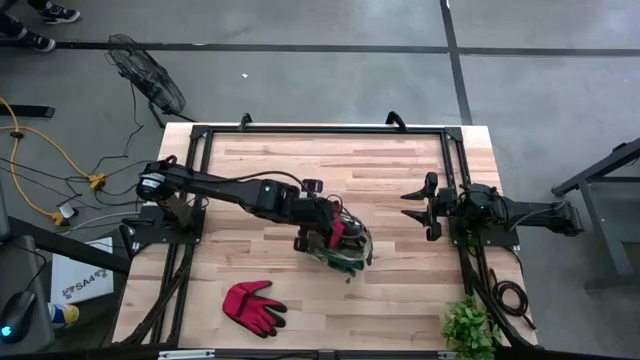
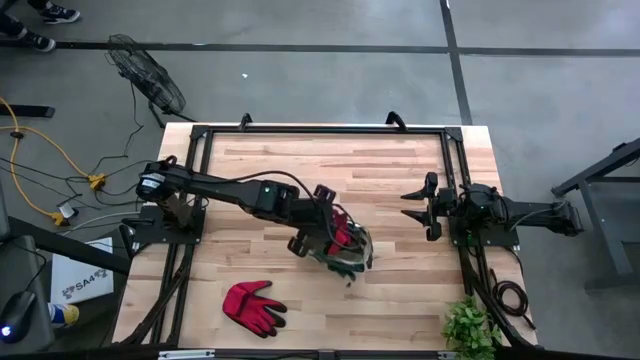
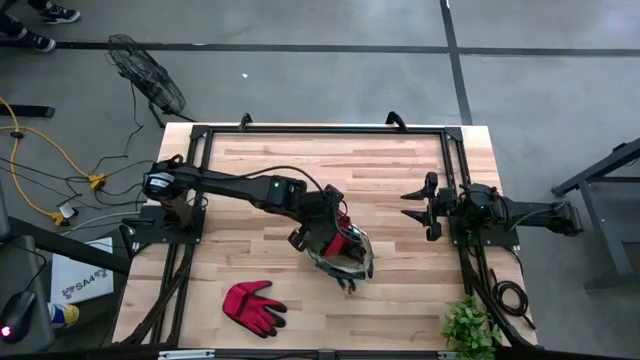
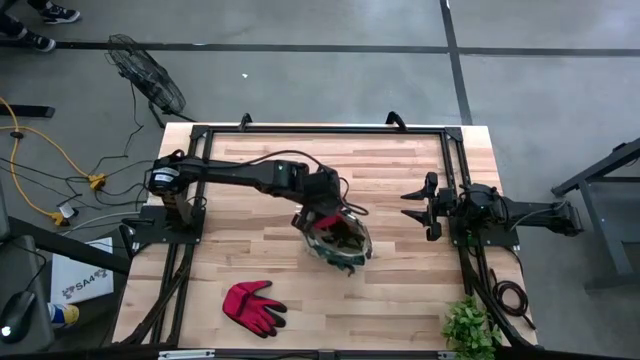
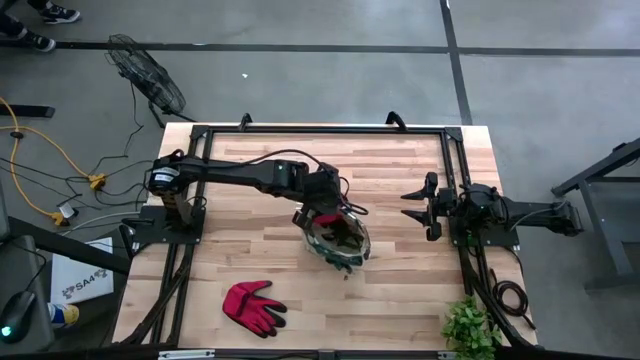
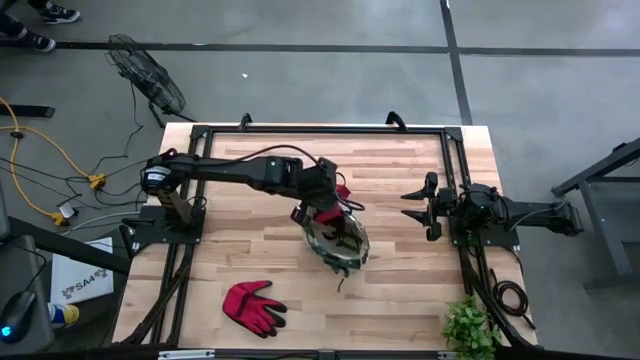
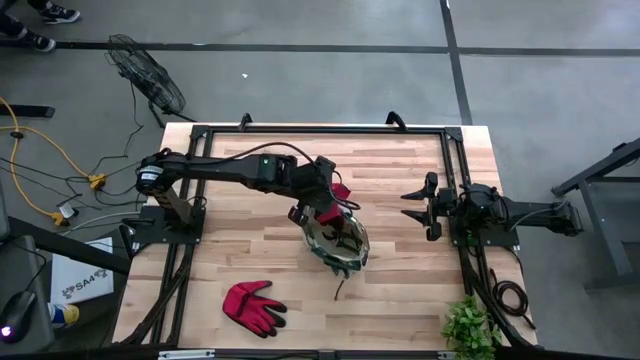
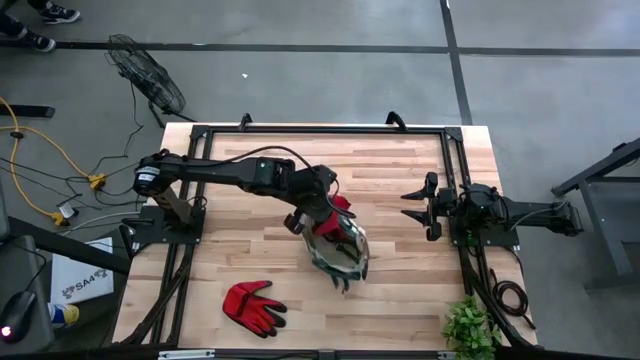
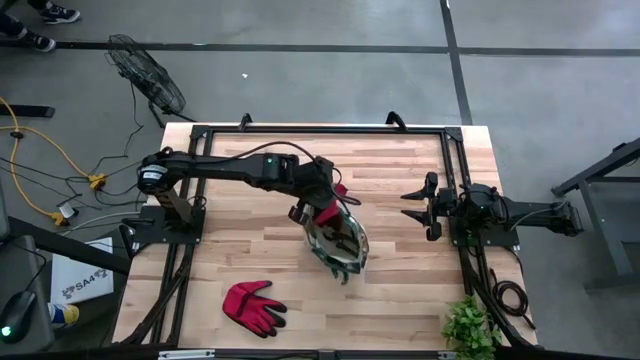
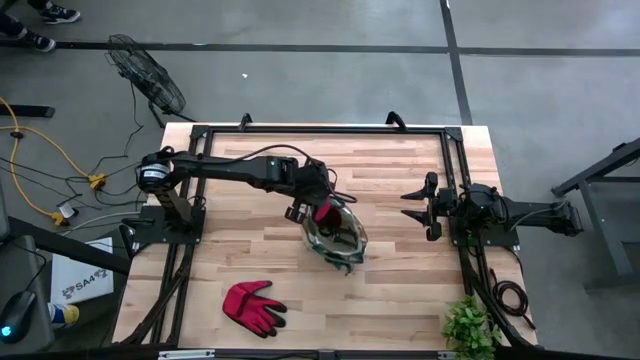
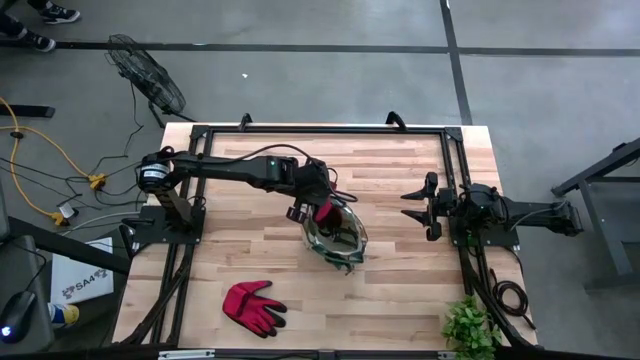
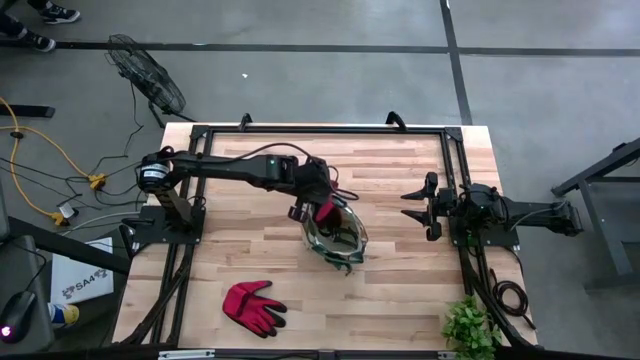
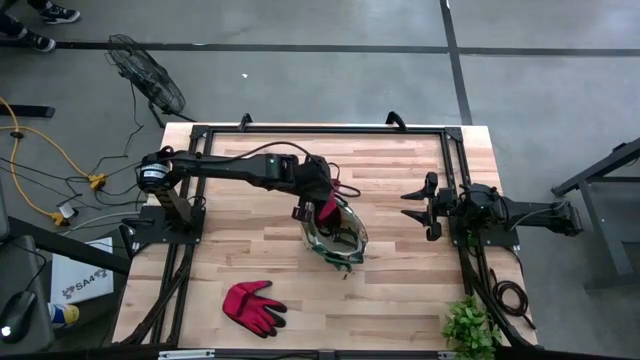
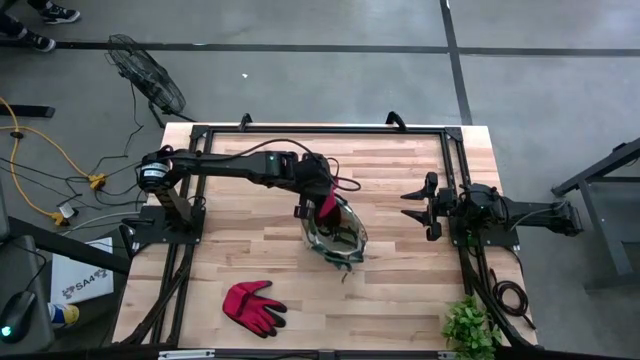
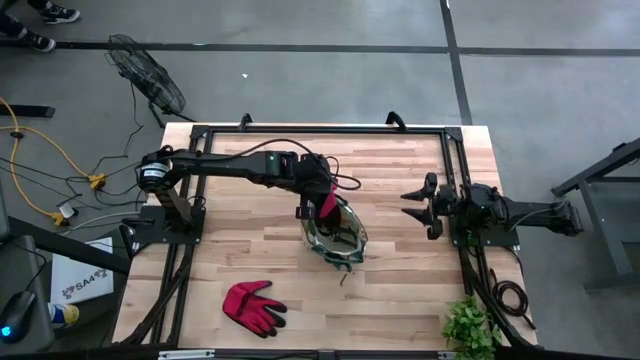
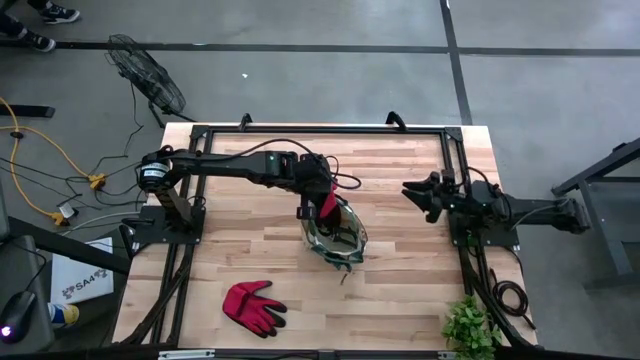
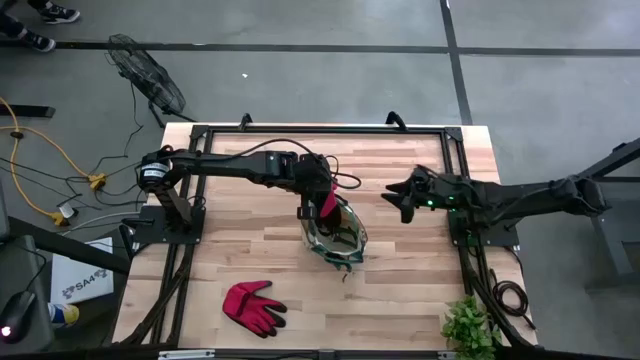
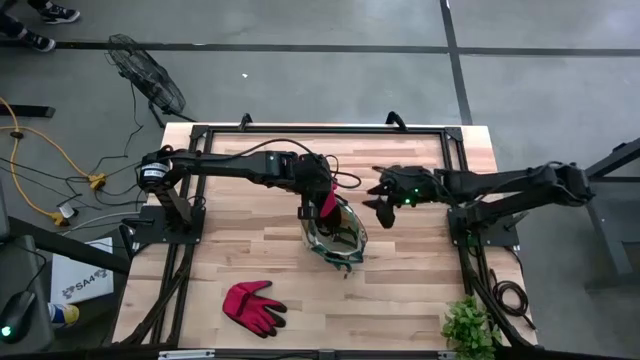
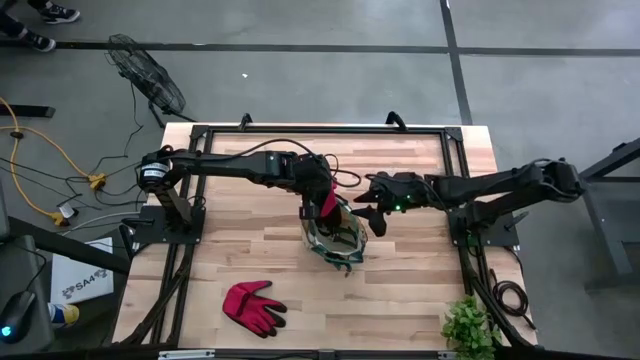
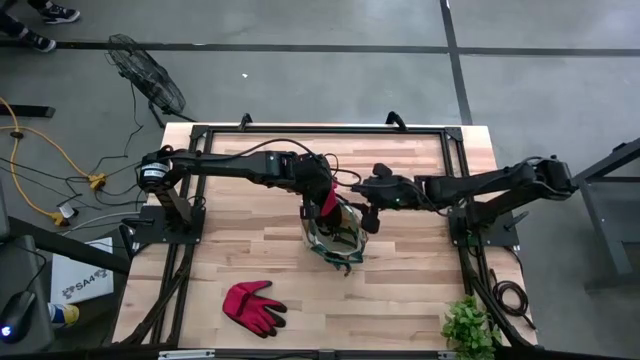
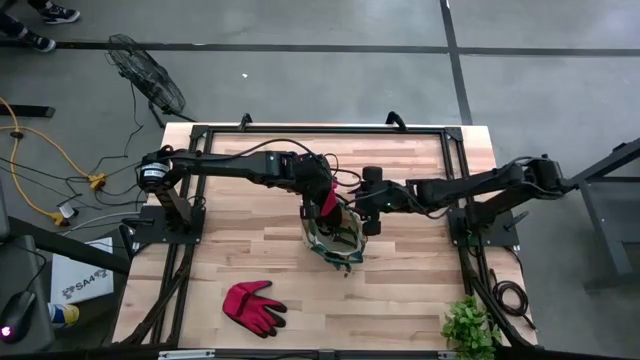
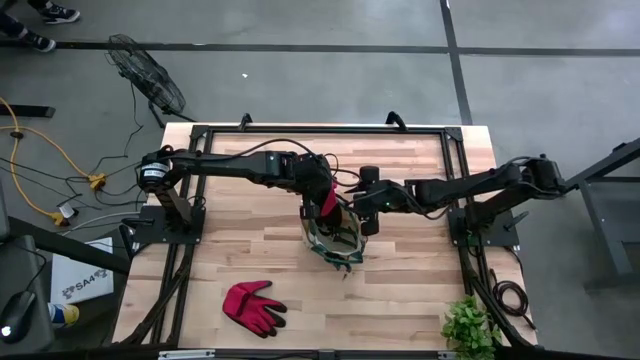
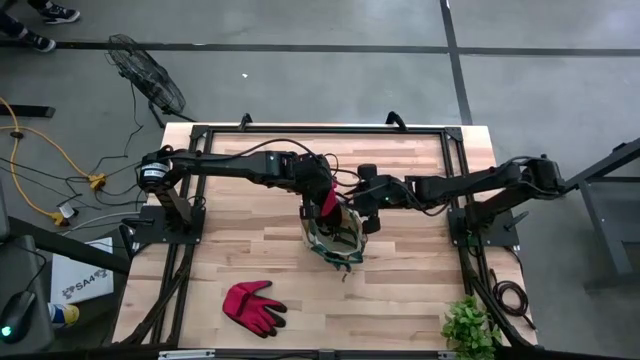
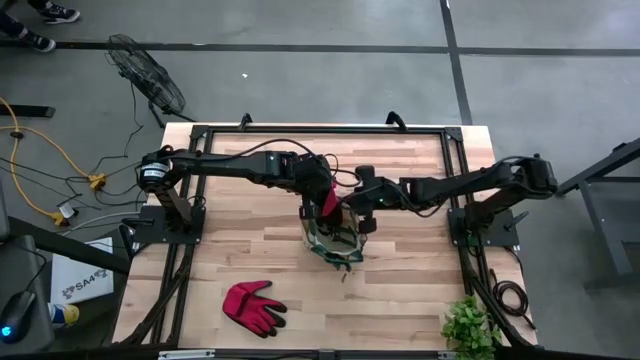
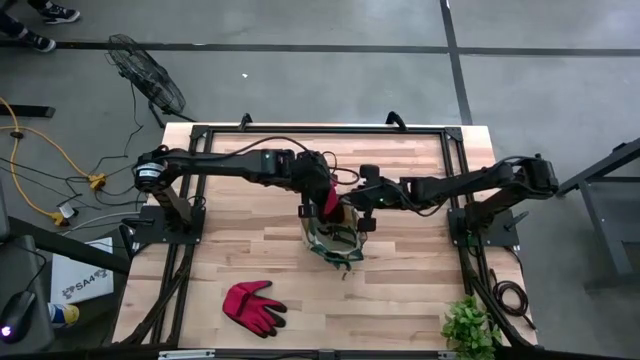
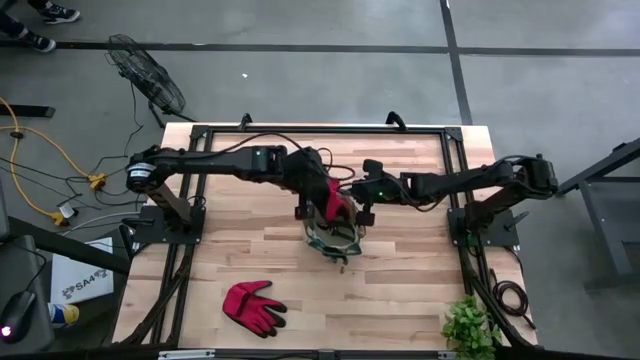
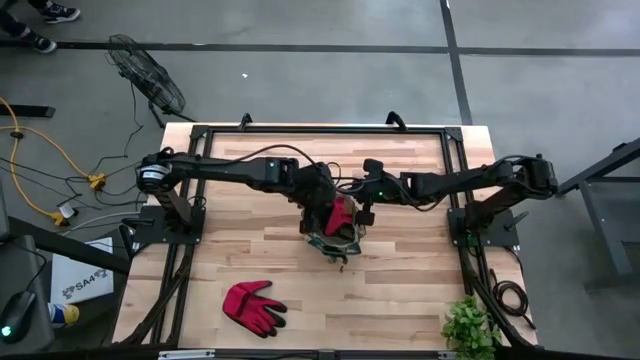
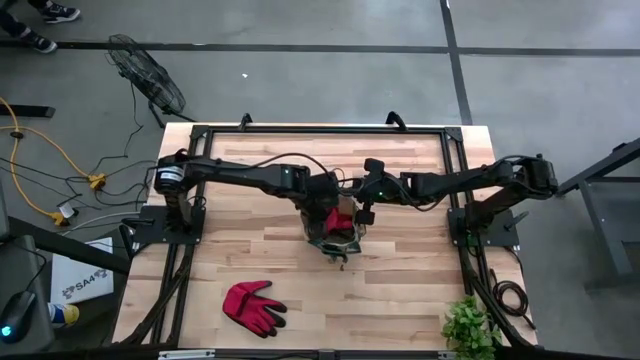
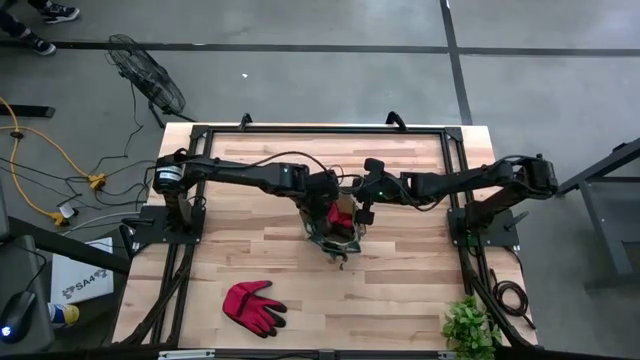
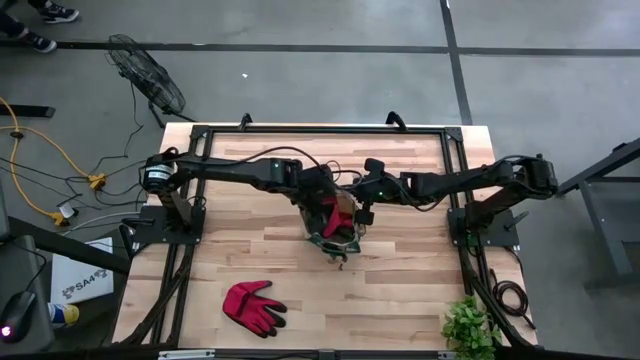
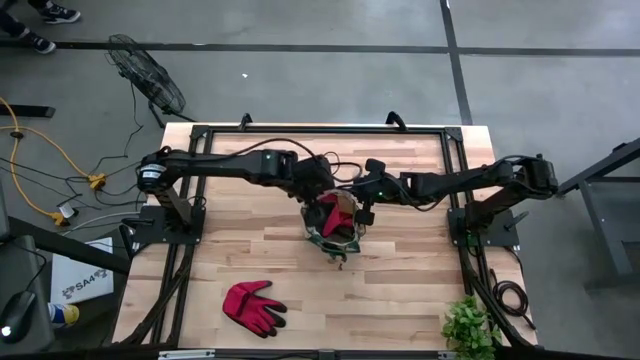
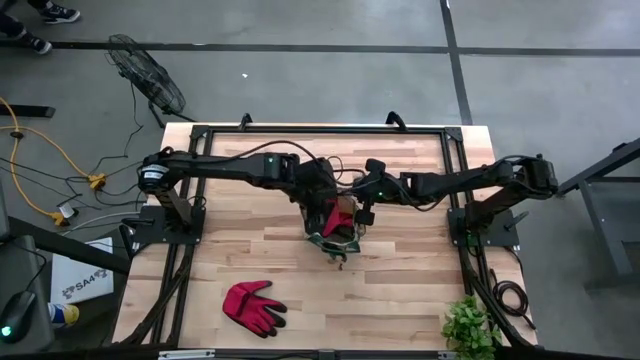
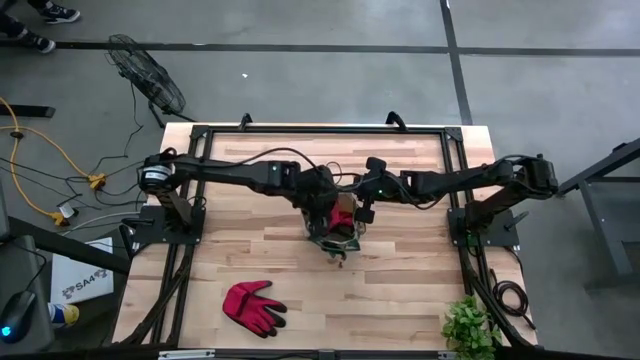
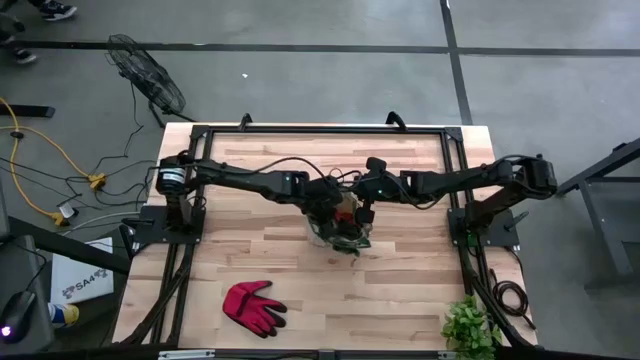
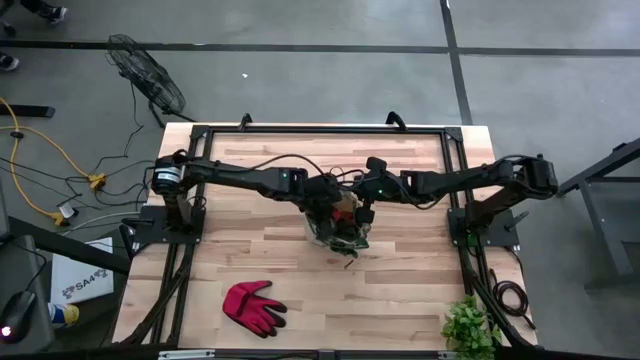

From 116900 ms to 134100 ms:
Task: Pick & Place Garden tools in Gardening bag
Put the red glove into the gardening bag

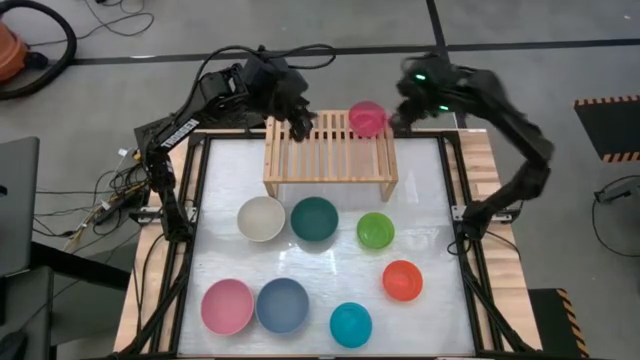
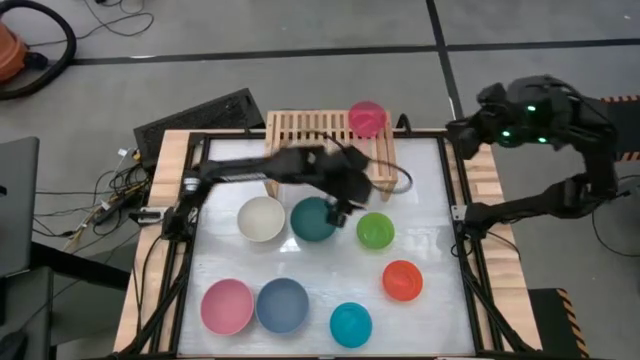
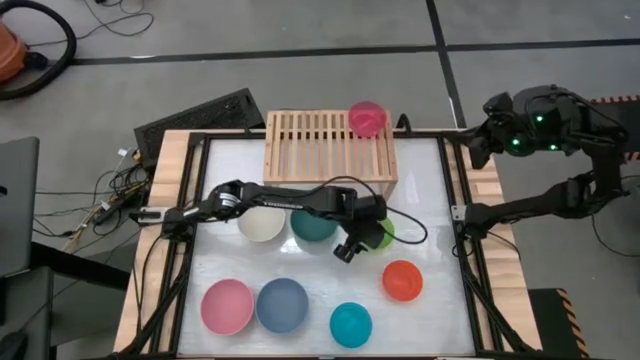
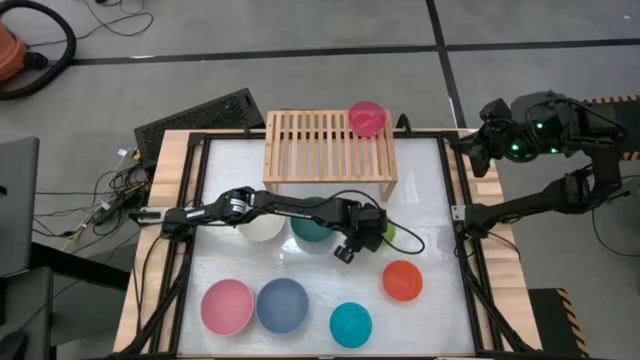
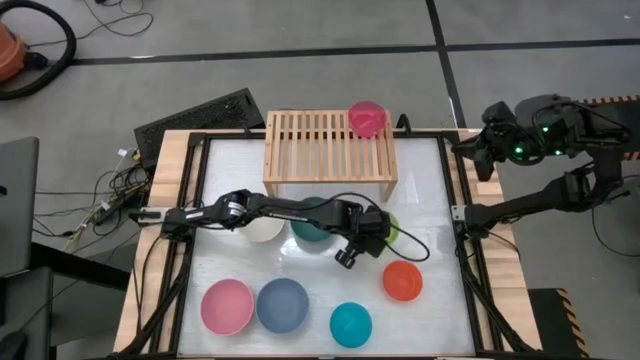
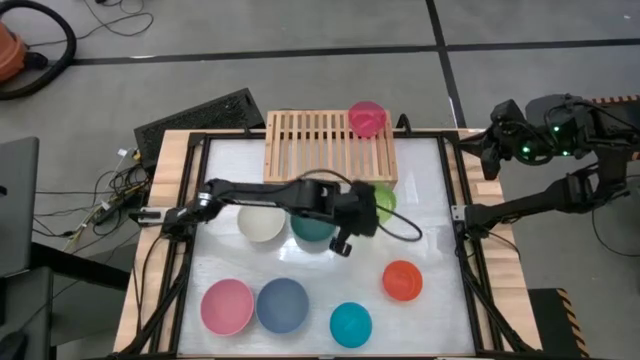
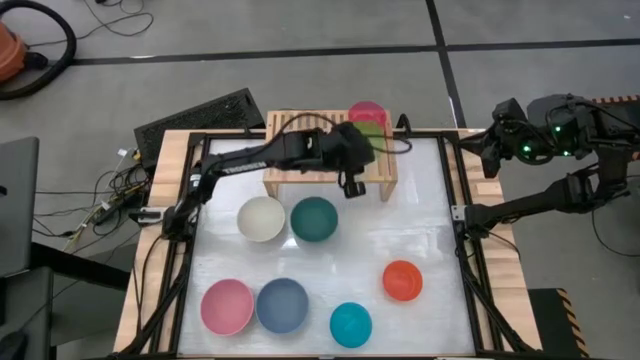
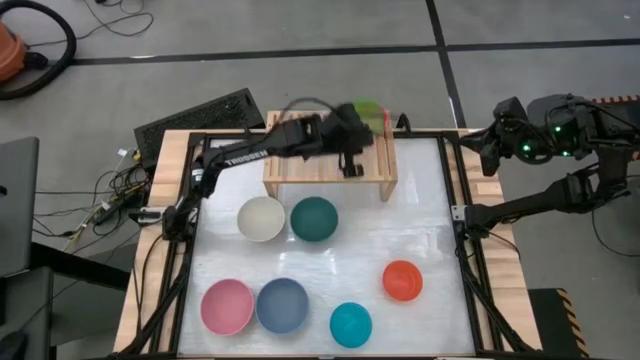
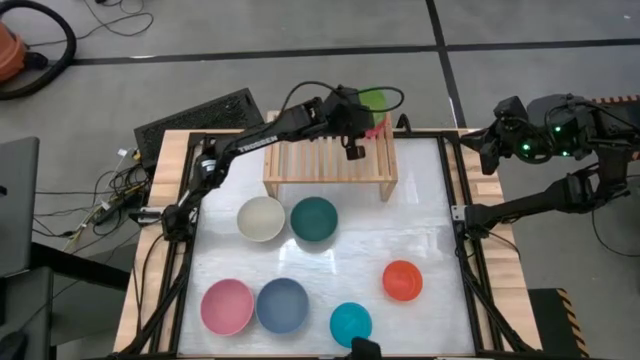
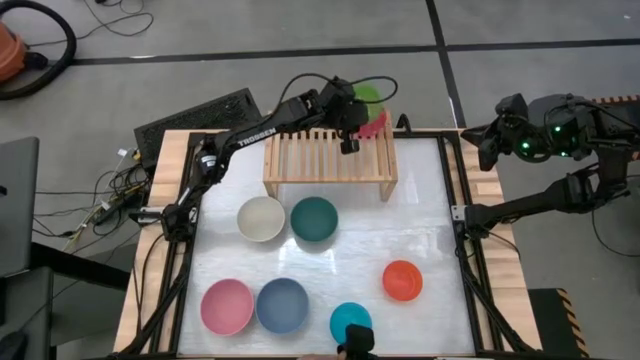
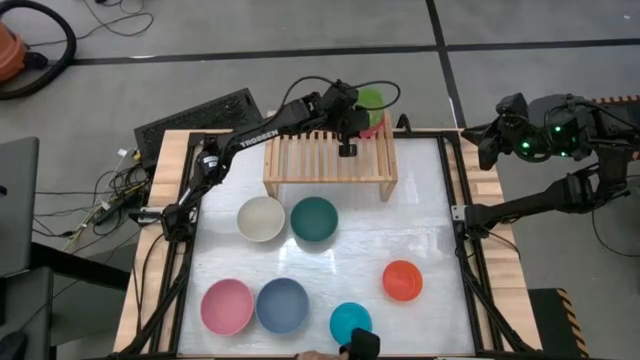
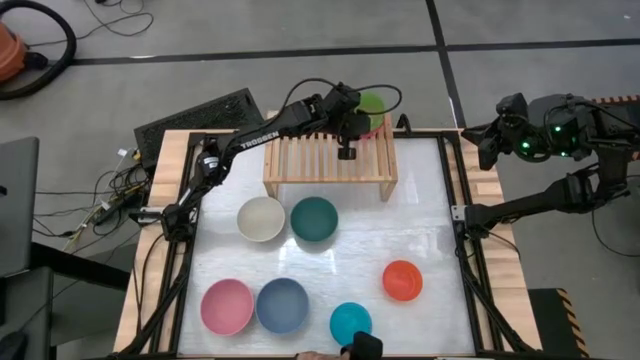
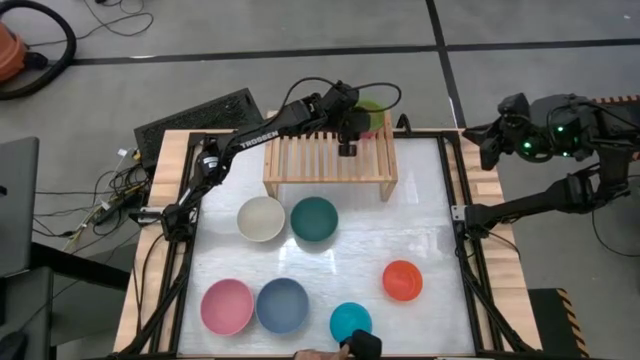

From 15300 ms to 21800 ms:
Task: Place and stack bowls onto a shelf
Stack the small green bowl on top of the small pink bowl
